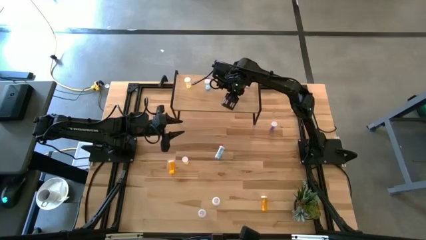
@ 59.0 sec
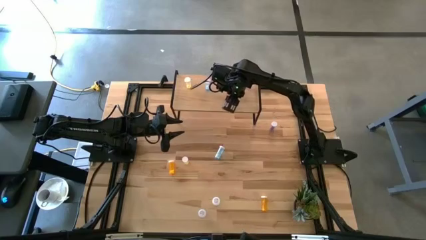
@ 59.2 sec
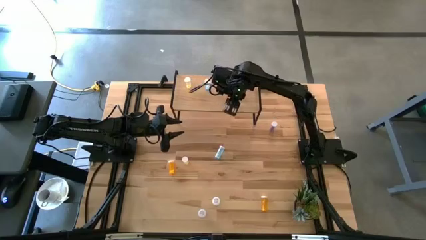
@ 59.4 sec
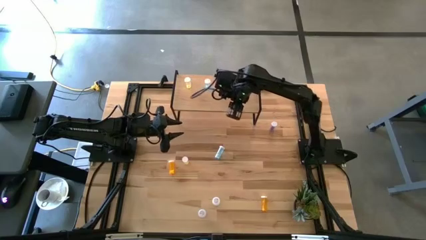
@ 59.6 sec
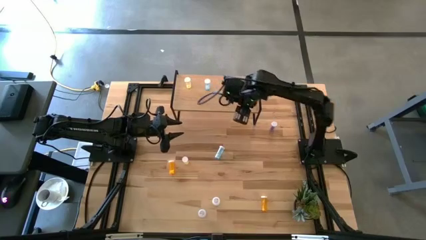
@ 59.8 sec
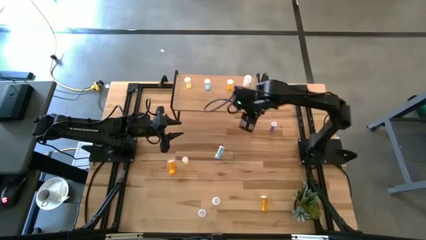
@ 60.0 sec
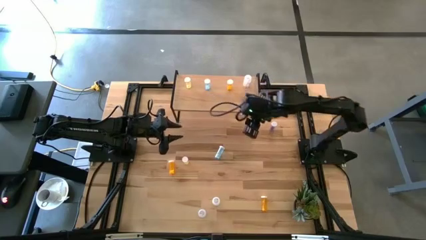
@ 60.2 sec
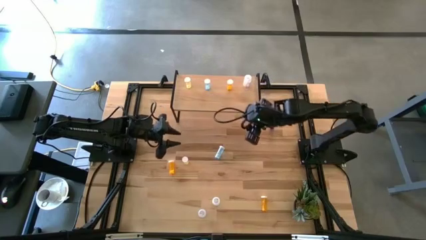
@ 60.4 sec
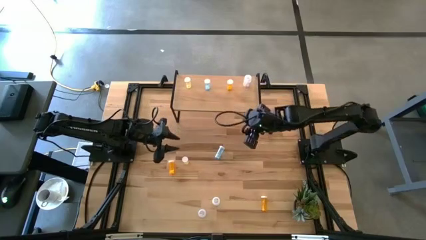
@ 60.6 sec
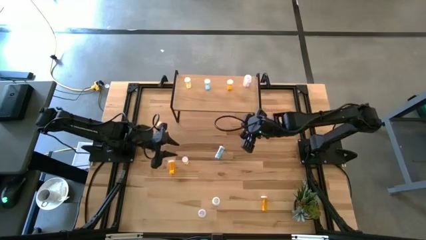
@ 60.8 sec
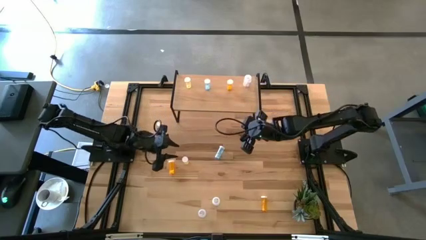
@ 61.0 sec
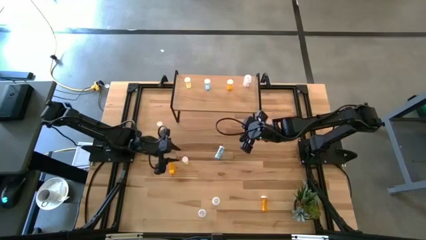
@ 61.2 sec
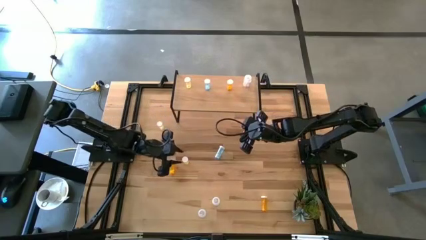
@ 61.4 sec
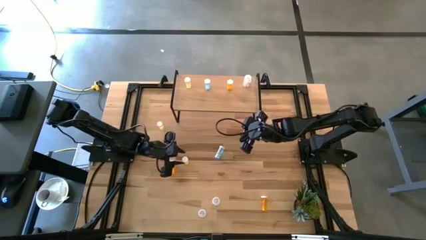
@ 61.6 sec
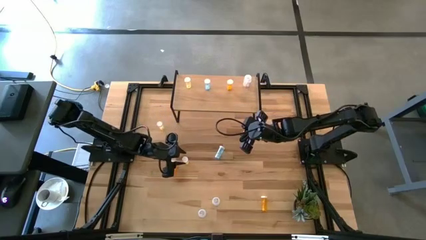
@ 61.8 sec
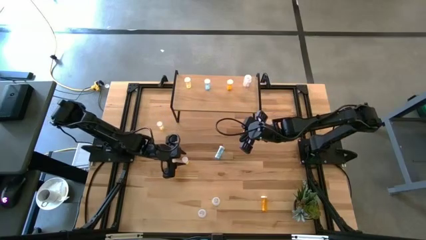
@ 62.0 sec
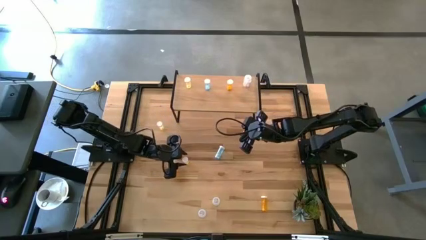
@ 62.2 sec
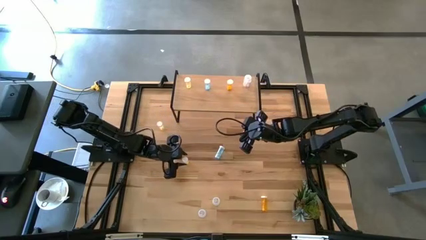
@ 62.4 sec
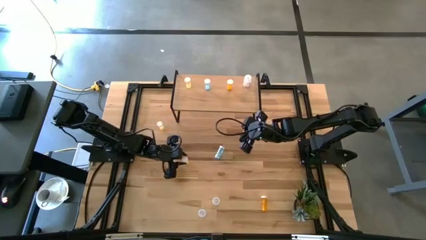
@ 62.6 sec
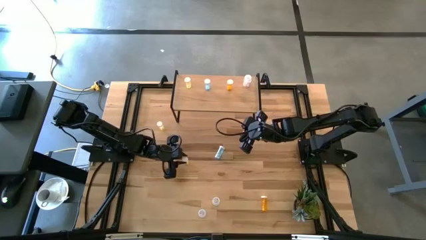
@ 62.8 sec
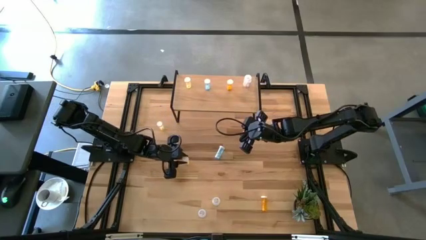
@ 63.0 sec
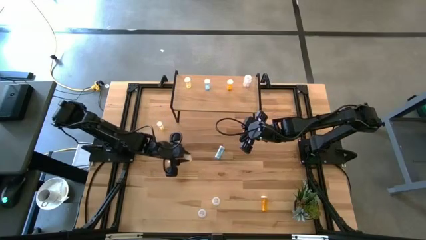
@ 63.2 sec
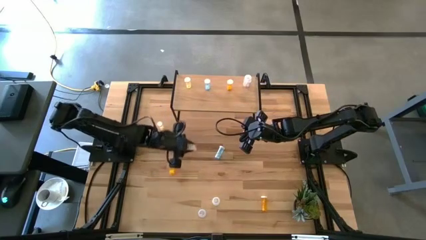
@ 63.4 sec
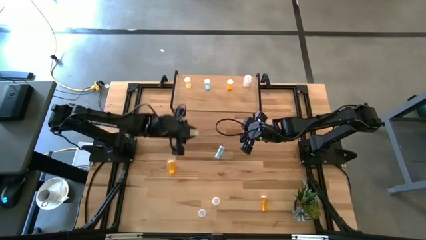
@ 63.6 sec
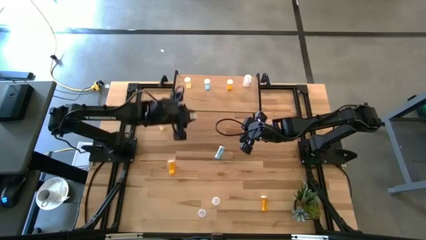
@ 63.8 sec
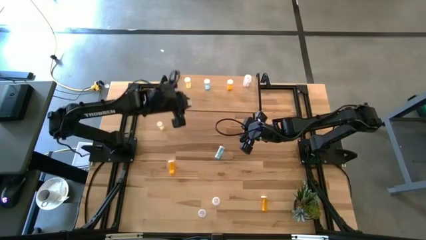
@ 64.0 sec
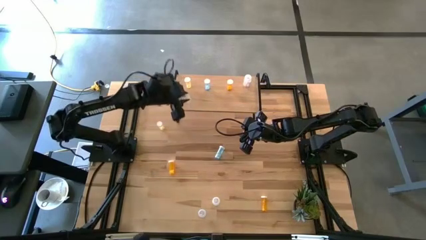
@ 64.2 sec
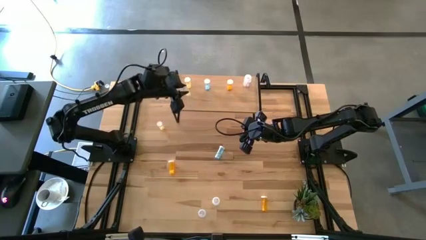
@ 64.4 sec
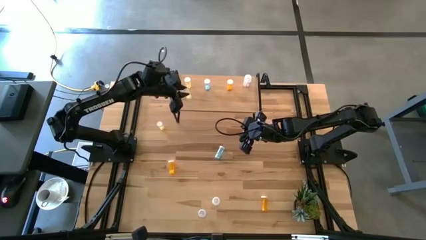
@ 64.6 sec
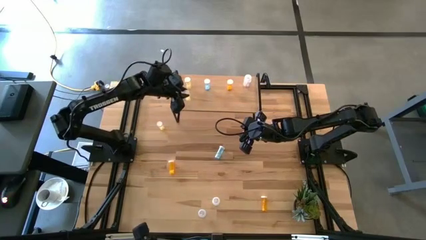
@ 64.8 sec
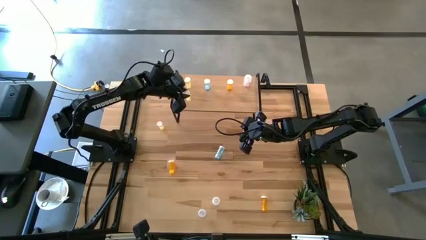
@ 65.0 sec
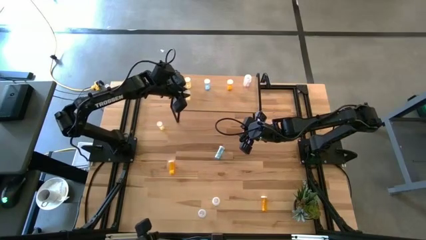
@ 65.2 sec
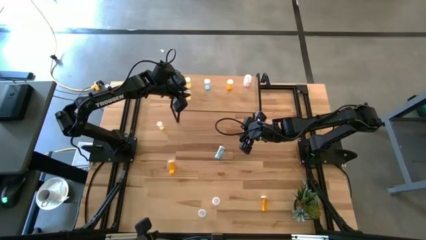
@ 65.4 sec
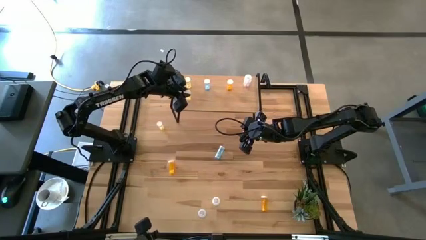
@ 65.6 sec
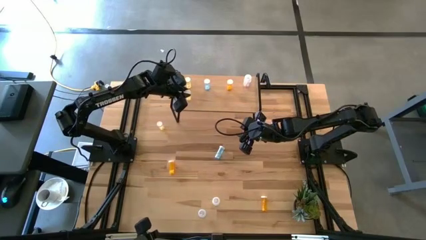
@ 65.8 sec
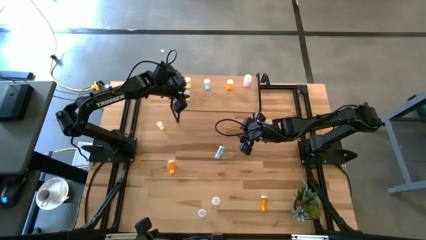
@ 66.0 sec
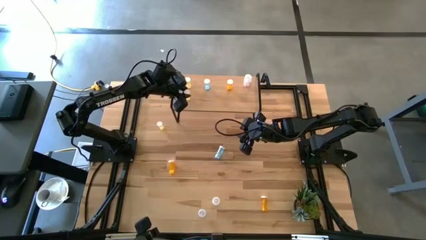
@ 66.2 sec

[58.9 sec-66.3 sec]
Task: Pick and place medicine bottles onto shelf by color
Put the bottom yellow pill bottle on the shelf aligned with the other yellow pill bottle

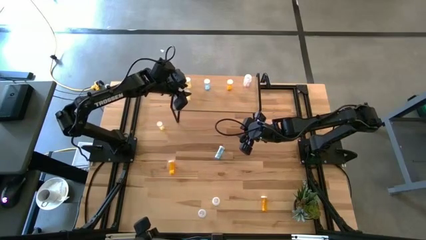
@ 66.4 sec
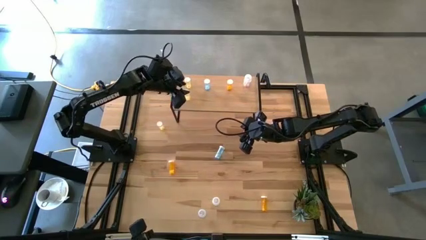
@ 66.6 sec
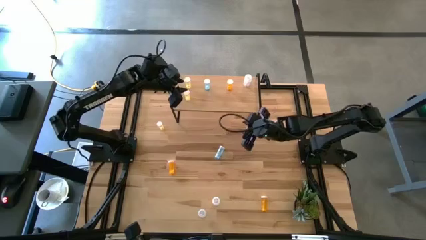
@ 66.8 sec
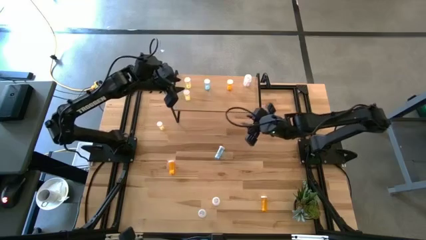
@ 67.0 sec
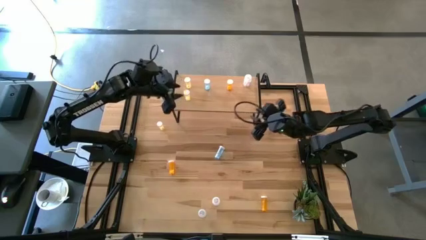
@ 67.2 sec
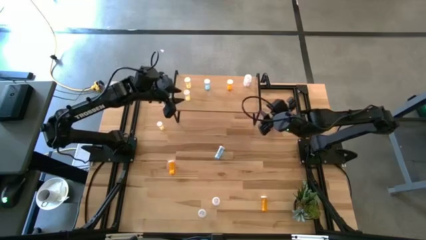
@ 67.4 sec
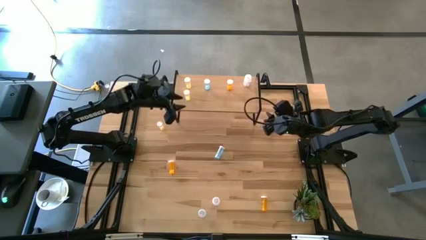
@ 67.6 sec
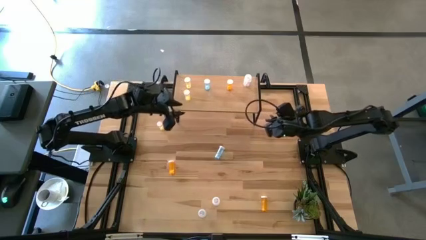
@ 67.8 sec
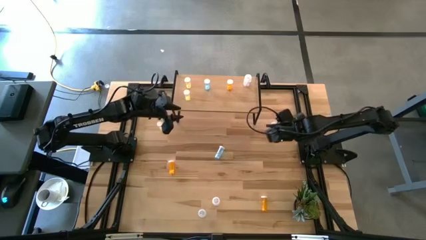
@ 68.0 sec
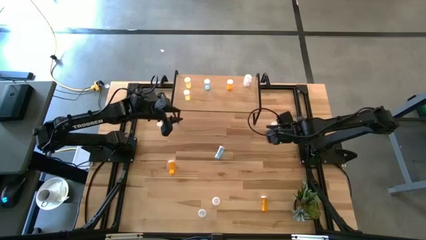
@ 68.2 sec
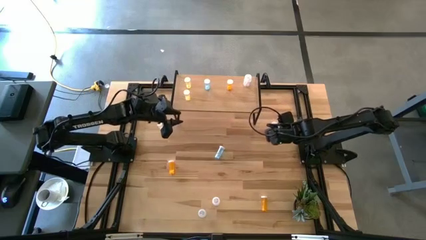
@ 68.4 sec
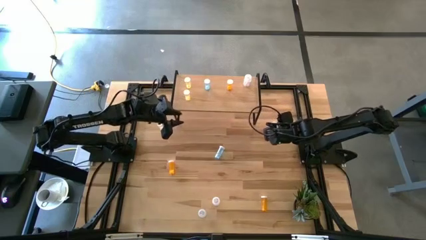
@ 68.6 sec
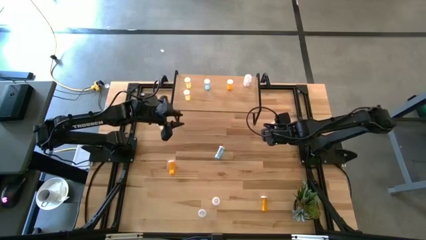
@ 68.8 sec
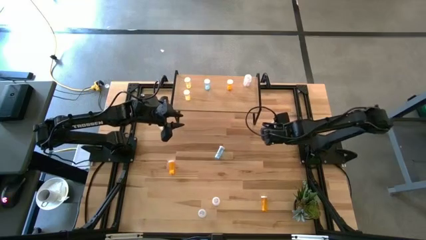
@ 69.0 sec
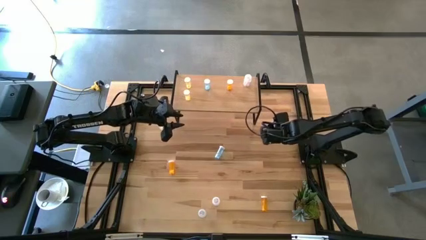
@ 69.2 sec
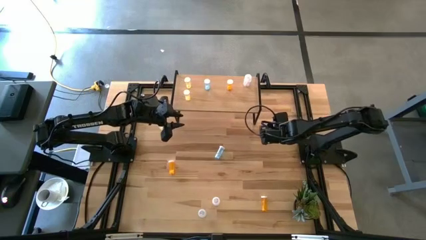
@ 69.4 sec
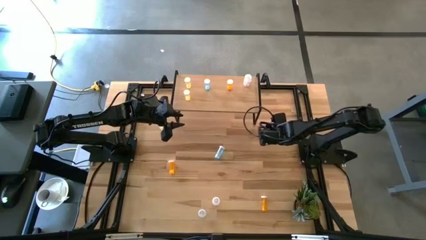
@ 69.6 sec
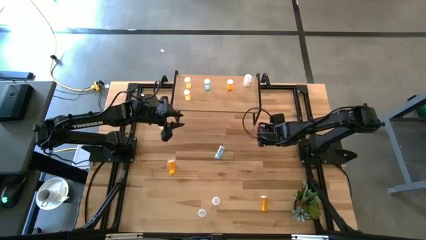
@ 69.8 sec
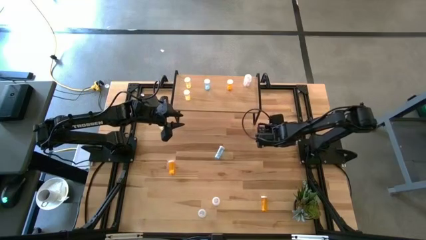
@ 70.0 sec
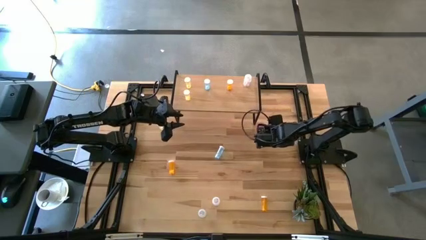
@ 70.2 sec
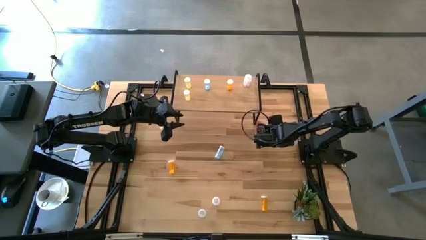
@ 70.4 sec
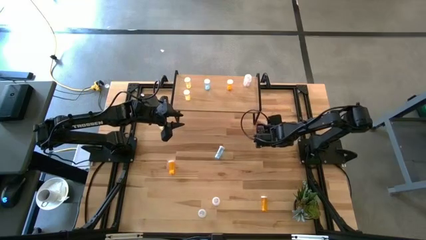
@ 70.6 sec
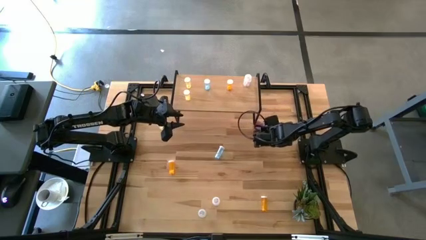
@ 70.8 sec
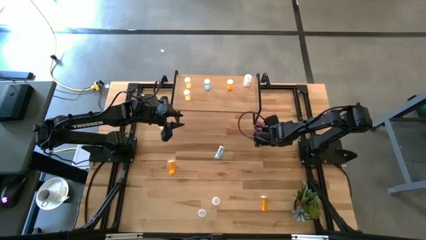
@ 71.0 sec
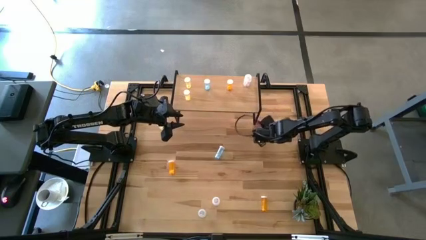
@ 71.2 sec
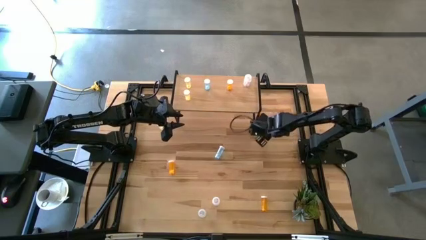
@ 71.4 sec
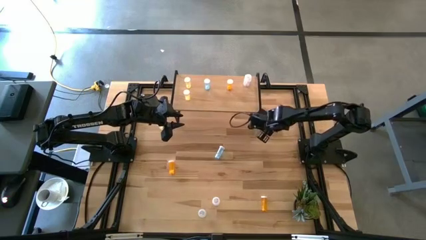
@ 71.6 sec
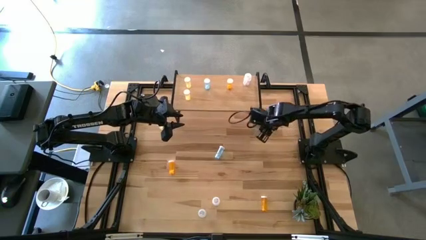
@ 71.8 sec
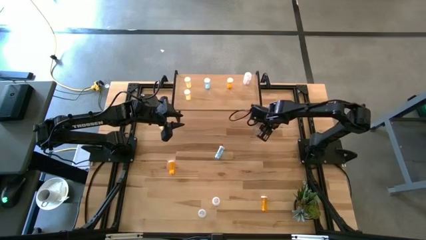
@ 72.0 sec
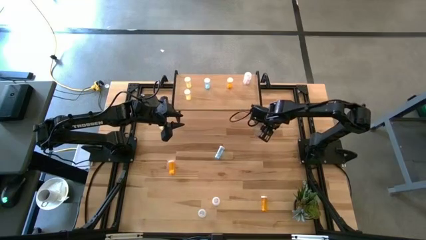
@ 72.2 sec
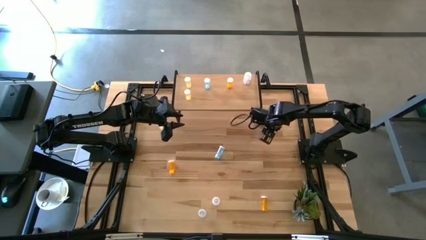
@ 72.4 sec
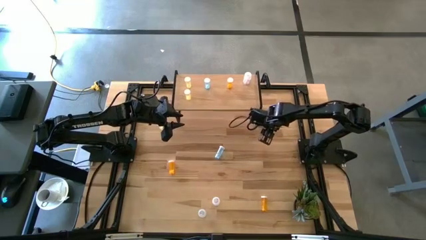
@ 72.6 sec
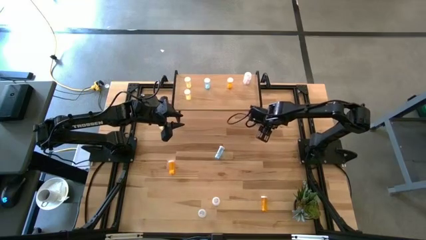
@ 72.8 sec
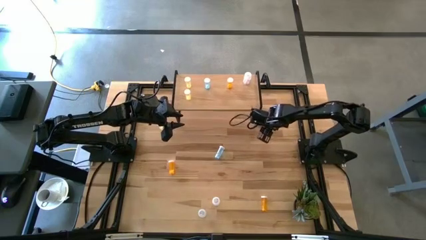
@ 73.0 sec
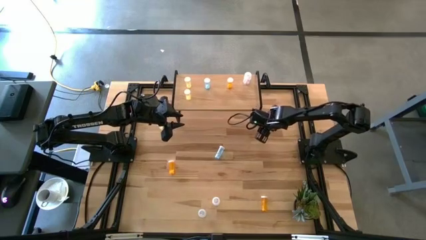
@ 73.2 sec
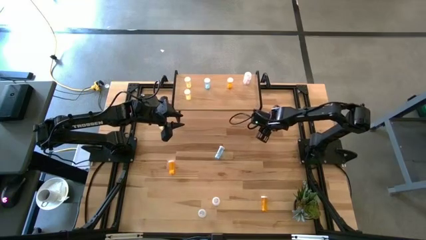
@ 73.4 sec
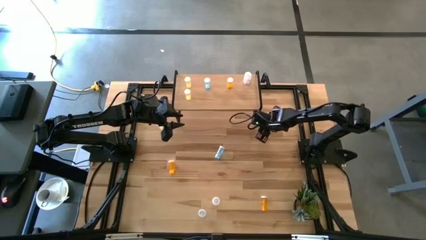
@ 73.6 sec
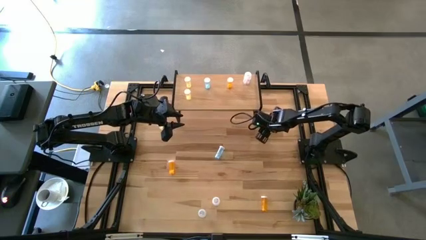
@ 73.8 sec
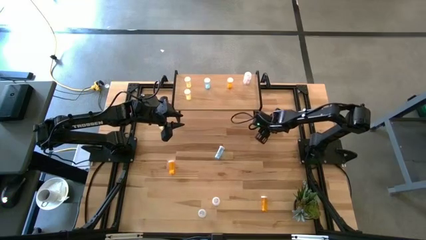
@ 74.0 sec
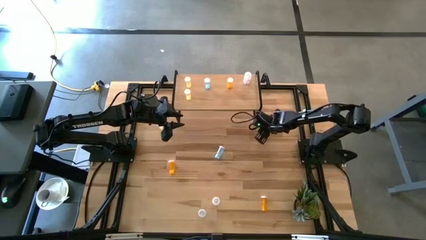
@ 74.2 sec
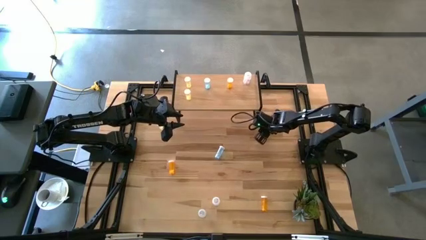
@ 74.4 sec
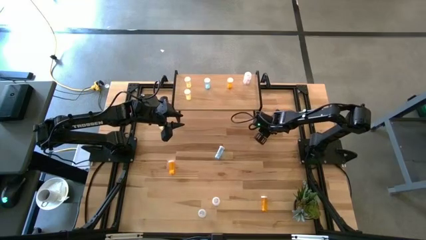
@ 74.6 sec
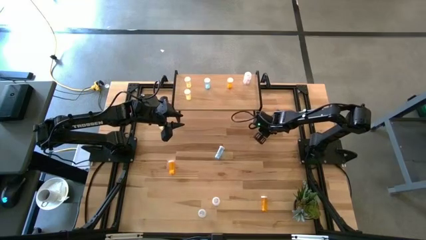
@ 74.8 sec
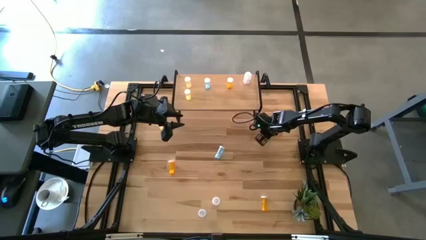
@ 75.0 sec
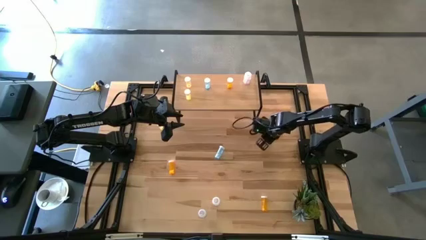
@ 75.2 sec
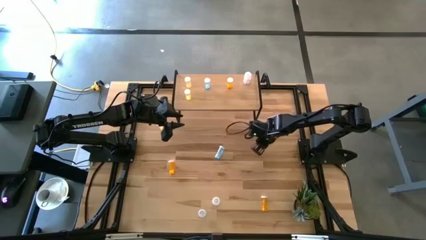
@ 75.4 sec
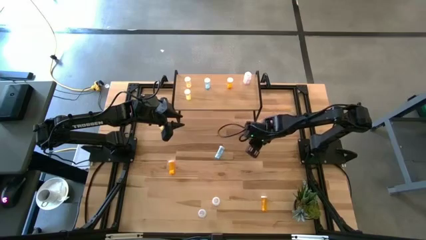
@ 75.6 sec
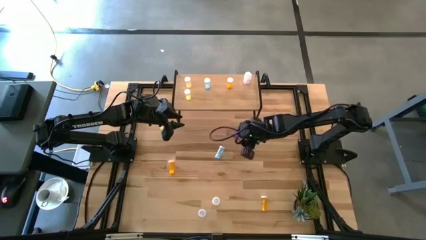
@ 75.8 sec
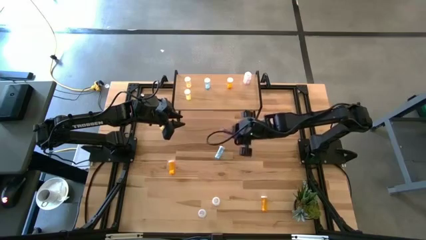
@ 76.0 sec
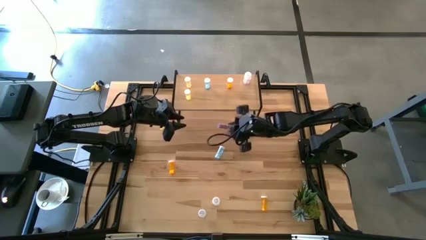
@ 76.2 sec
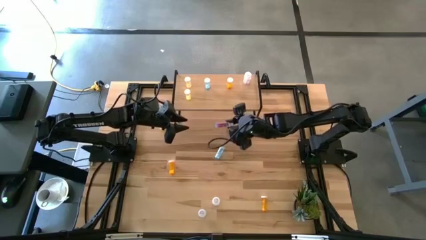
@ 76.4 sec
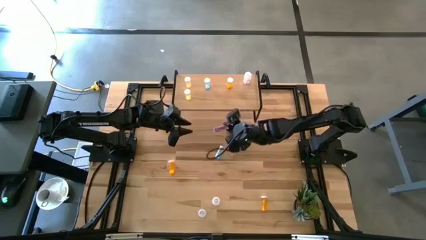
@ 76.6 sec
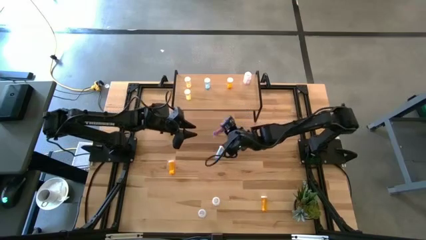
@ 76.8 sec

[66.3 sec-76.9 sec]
Put the top blue pill bottle on the shelf aligned with the other blue pill bottle
